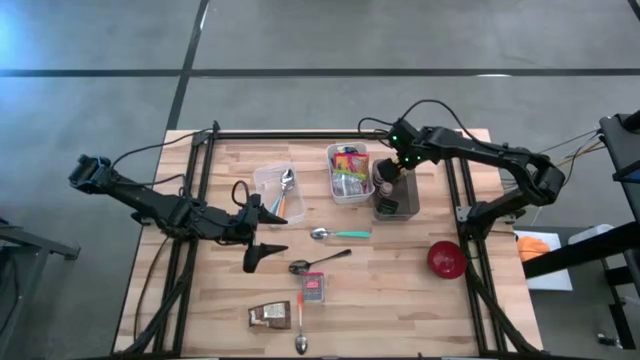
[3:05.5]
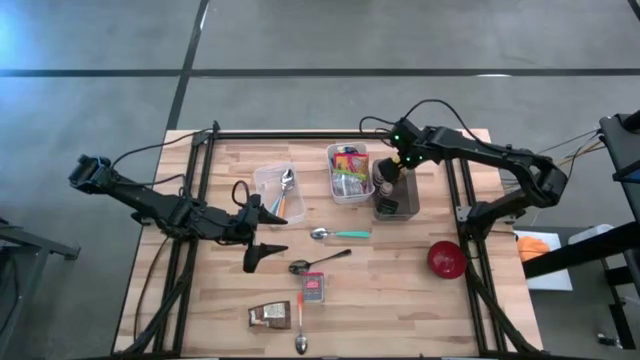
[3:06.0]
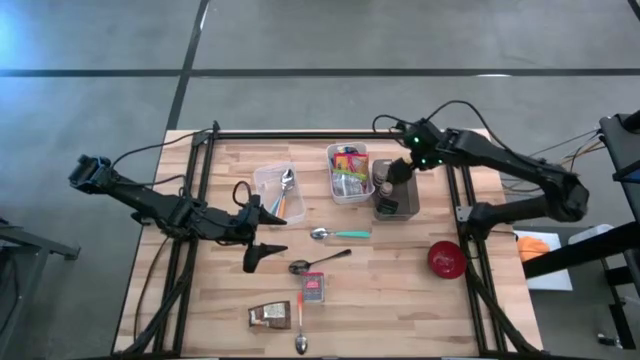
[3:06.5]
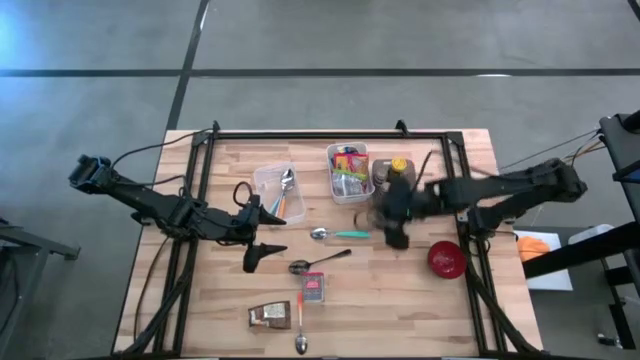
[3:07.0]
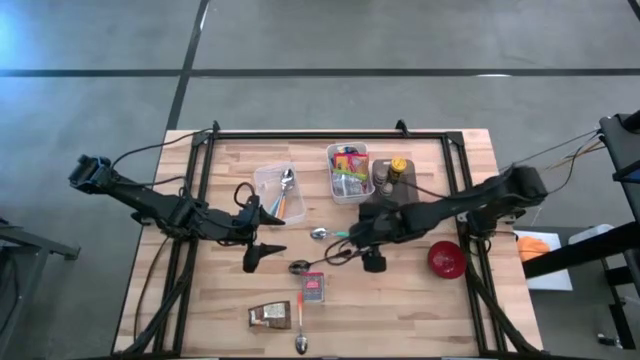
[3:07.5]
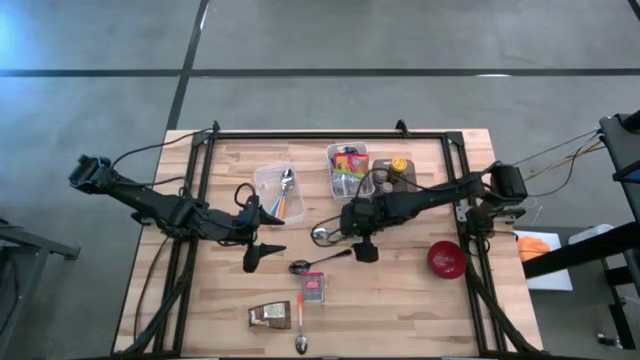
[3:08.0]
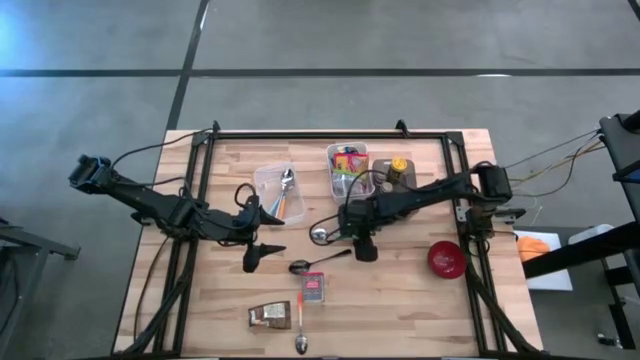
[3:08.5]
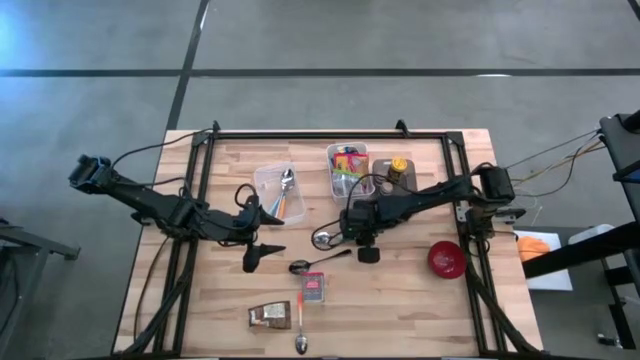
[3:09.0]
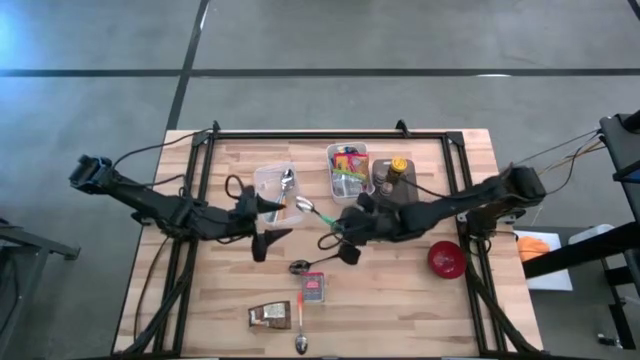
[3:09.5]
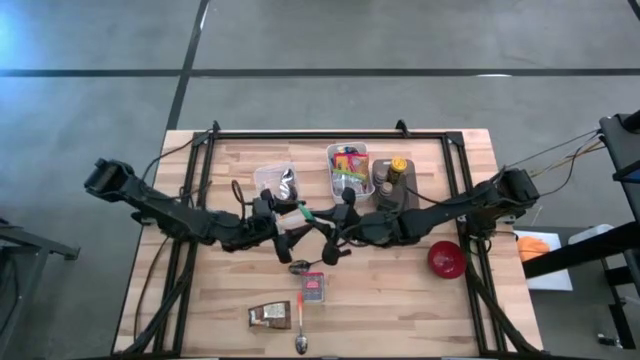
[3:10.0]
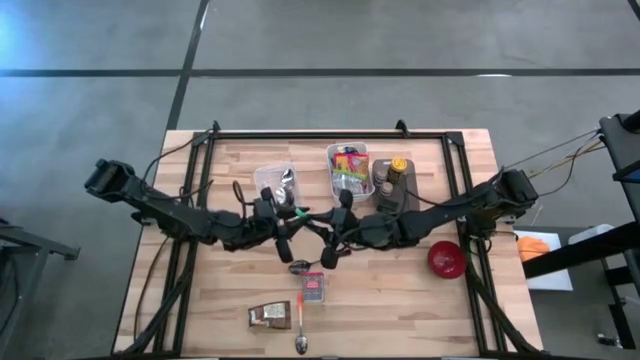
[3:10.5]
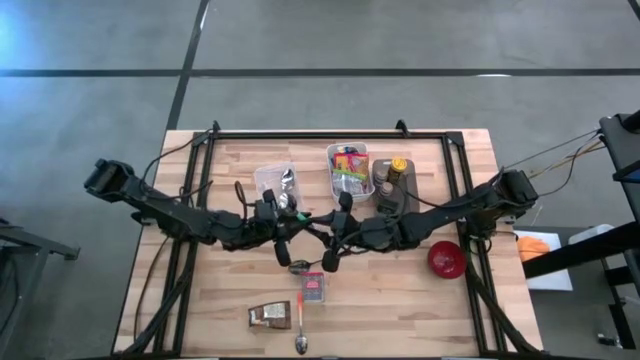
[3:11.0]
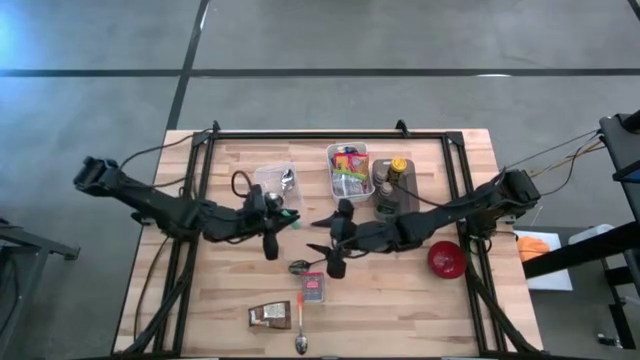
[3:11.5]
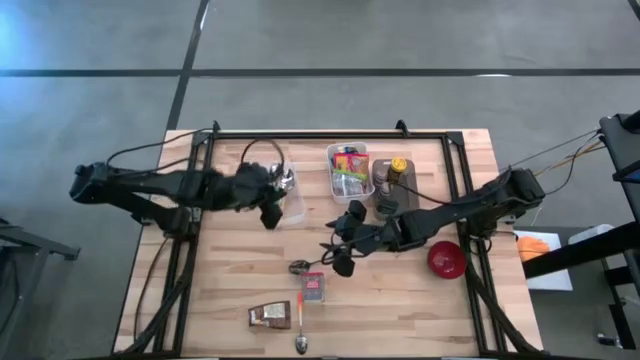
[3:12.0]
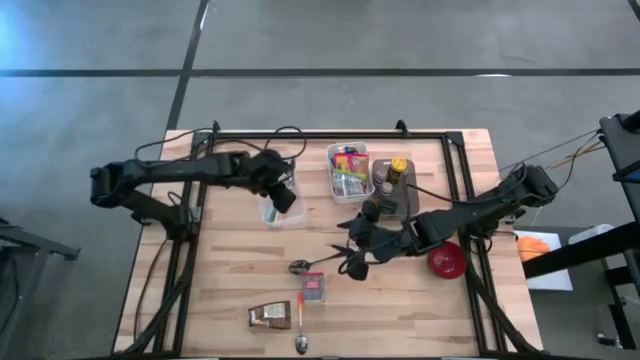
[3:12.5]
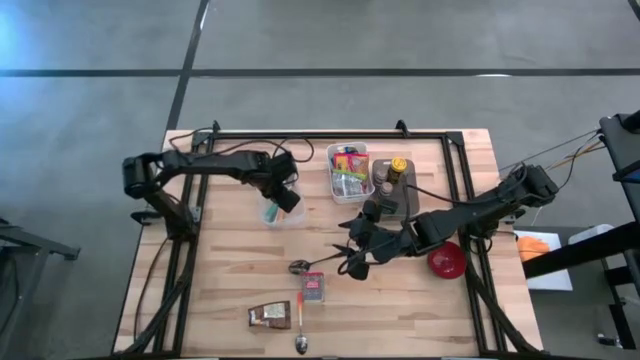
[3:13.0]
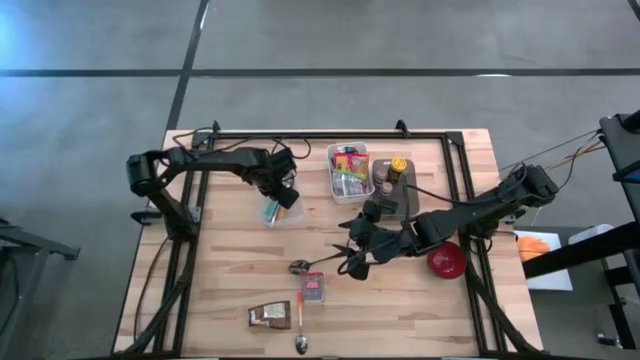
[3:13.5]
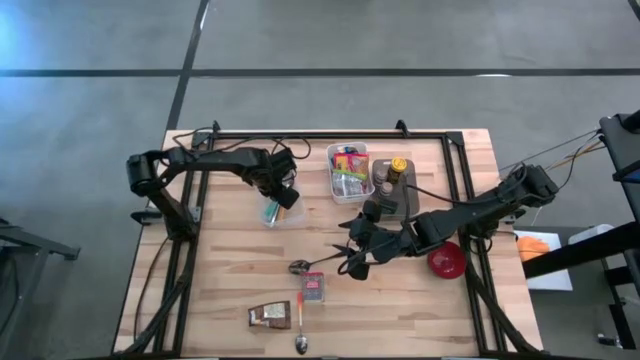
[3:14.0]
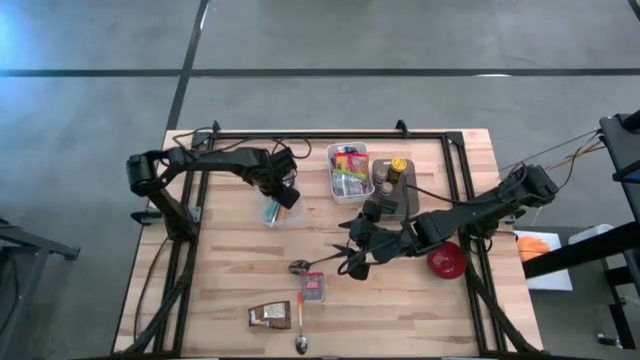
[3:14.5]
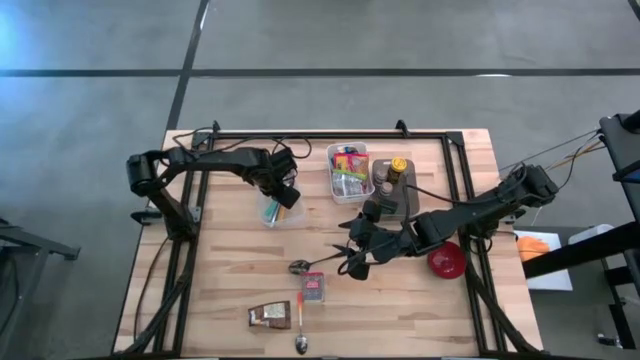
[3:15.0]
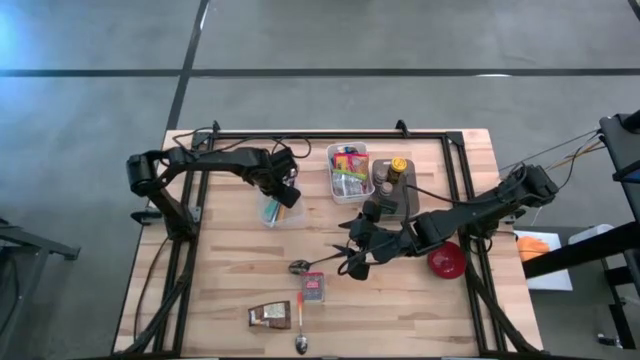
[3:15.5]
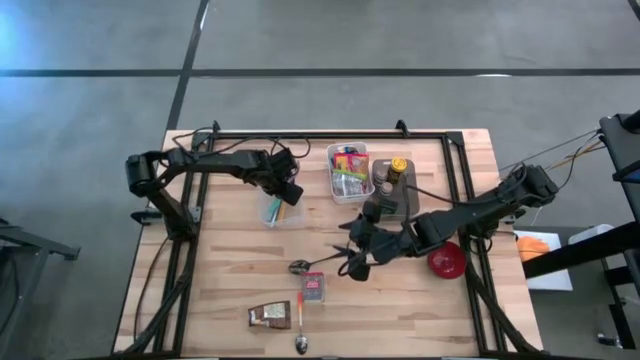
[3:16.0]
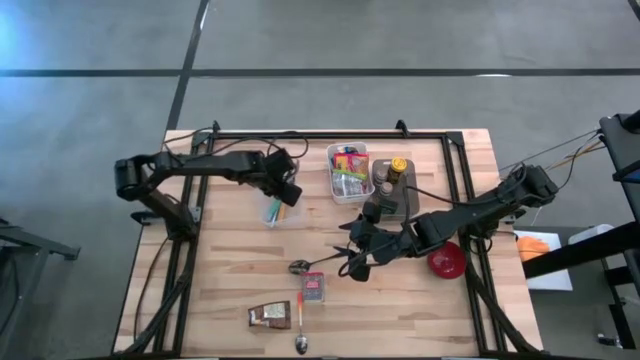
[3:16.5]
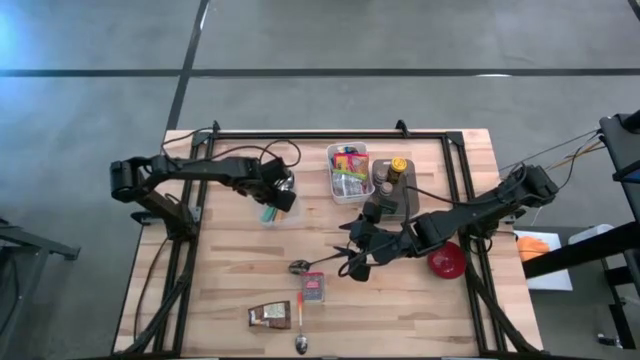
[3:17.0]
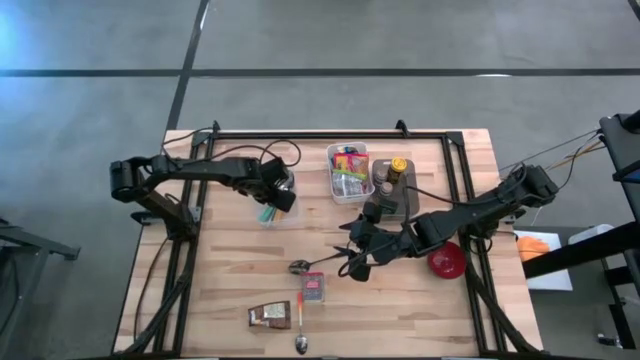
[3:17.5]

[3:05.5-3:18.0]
Put the green spoon into the transparent bin

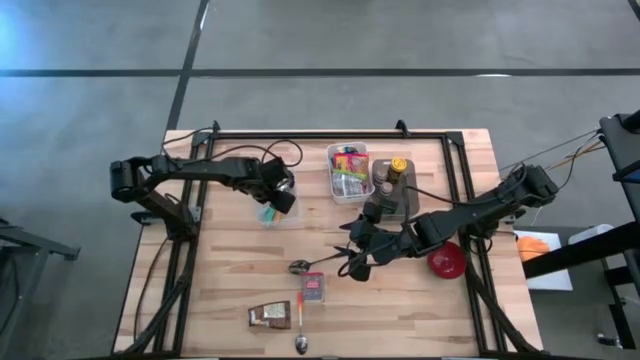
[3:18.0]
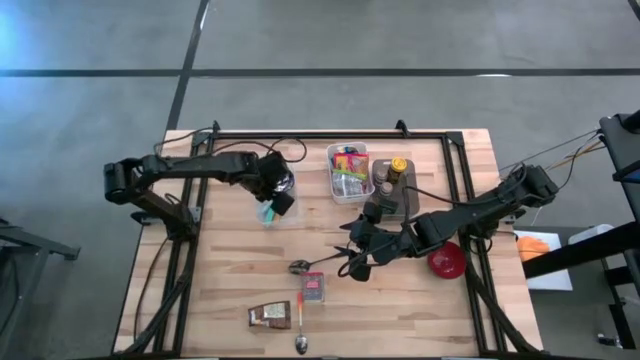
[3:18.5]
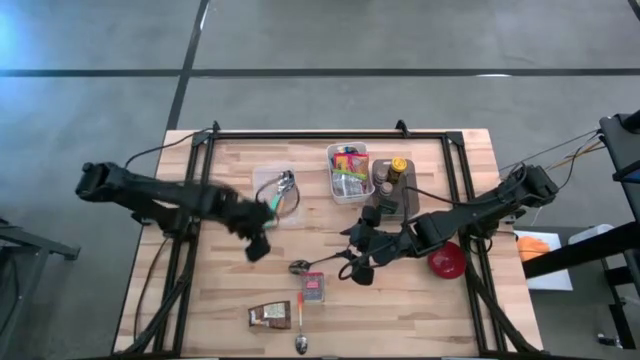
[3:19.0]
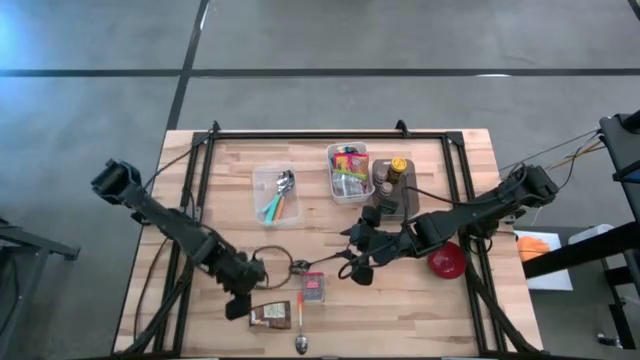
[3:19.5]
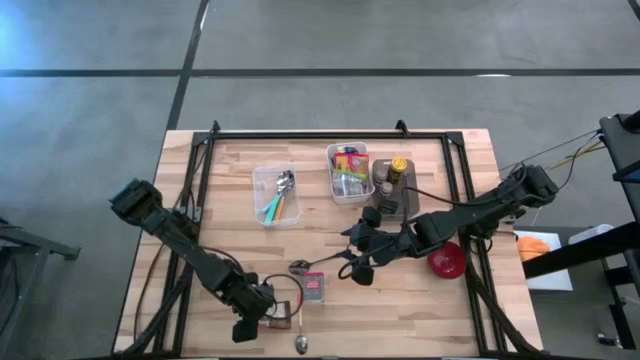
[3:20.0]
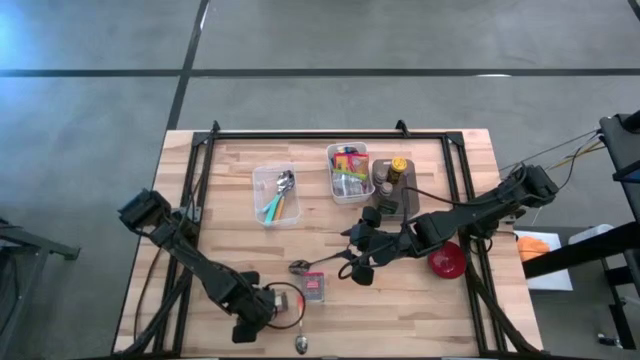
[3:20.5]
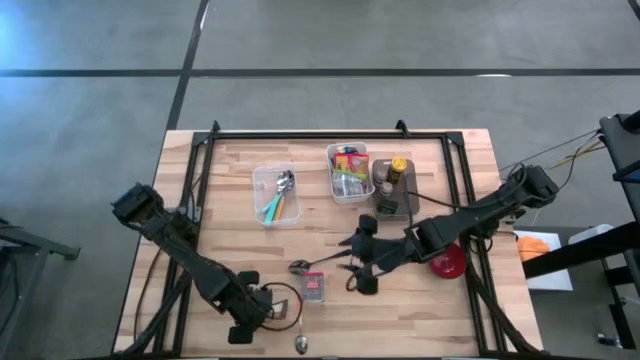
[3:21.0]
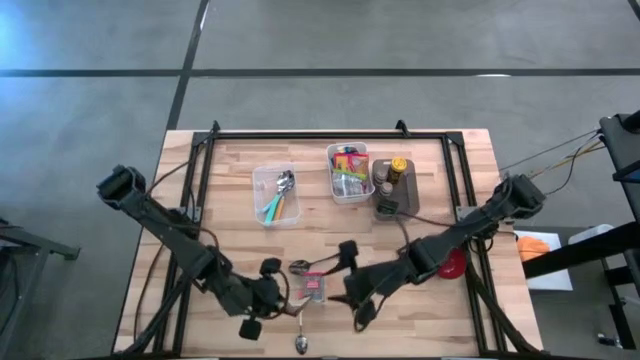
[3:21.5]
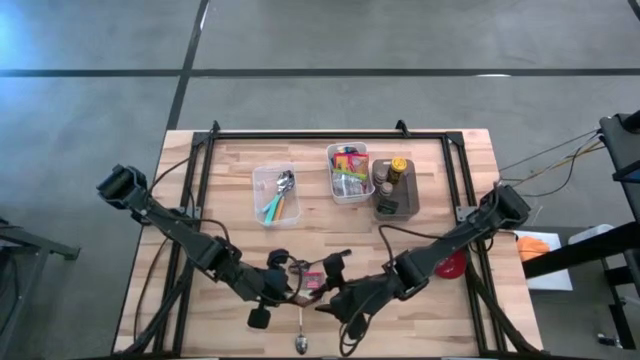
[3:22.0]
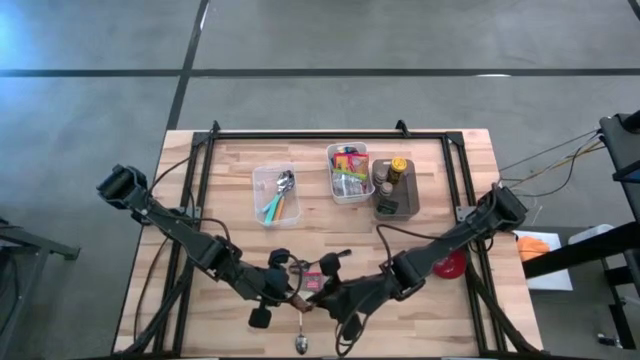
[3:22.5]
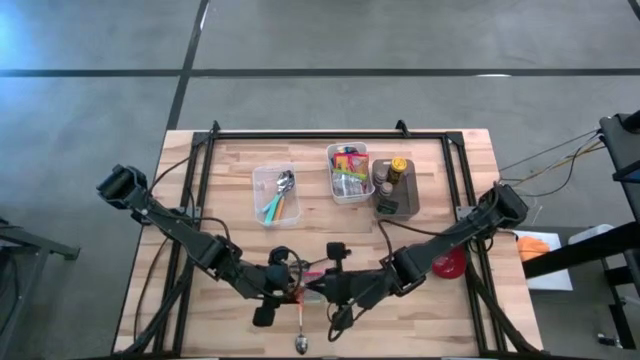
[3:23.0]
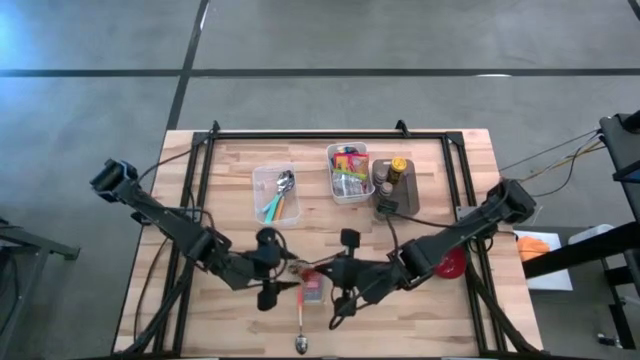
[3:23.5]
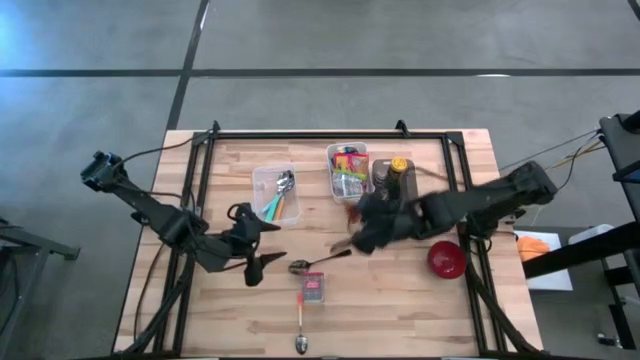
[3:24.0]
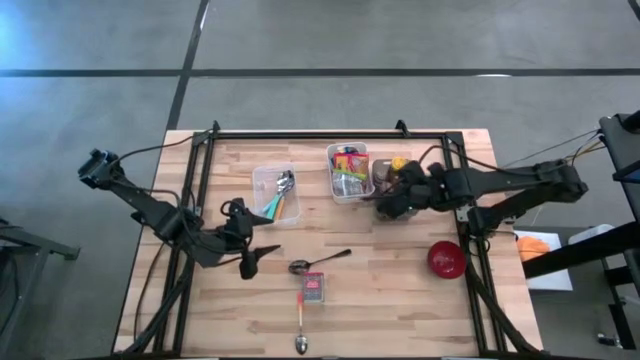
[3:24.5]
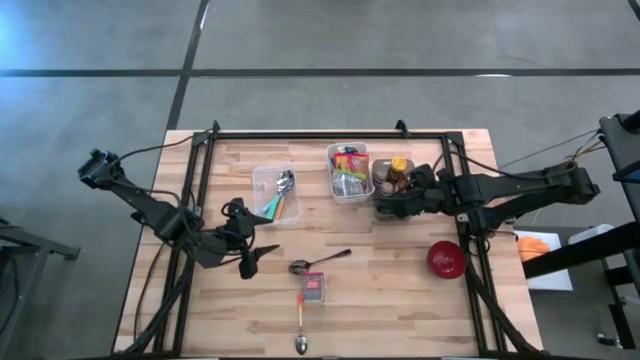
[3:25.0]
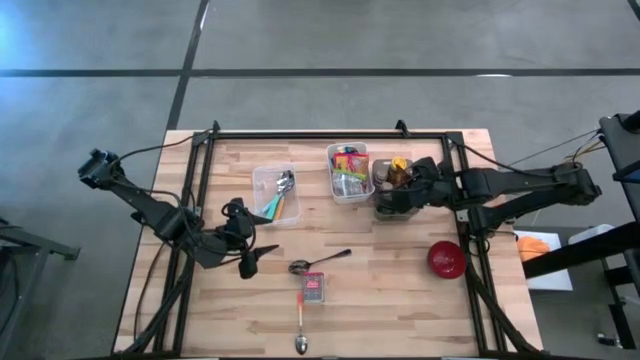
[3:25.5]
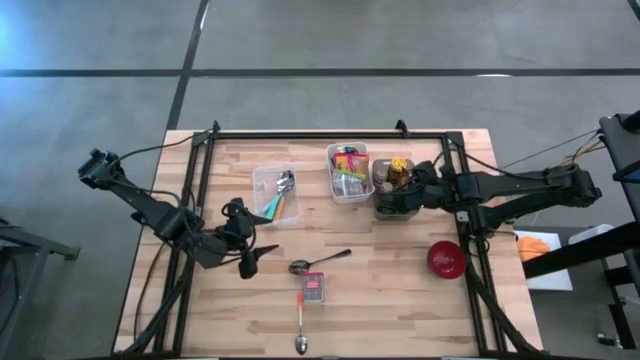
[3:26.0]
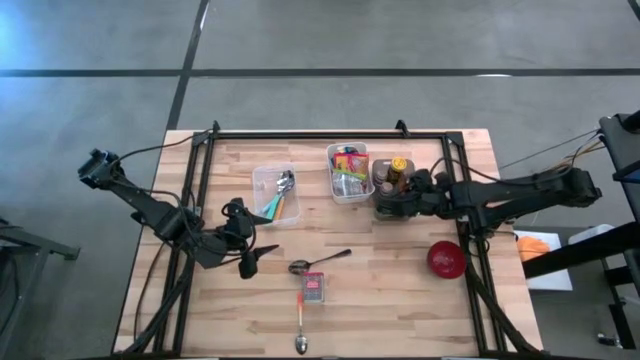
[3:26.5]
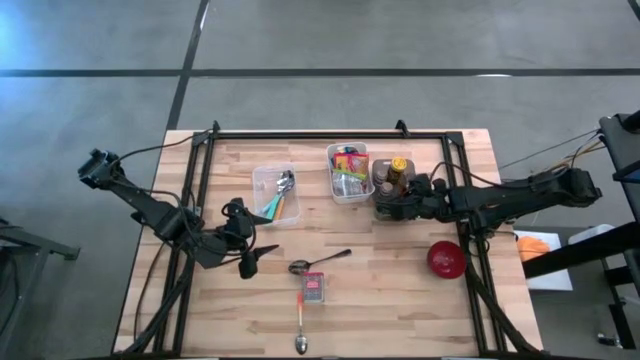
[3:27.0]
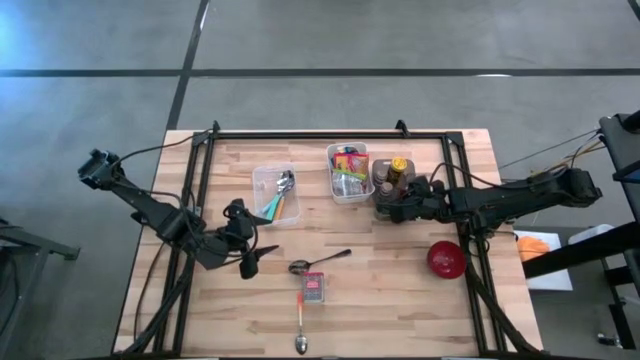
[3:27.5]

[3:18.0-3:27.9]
Put the brown seasoning pack into the black bin
